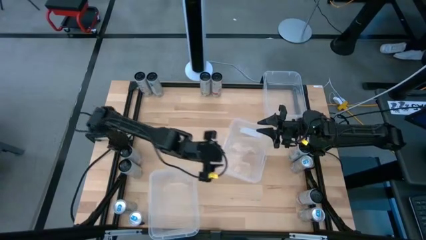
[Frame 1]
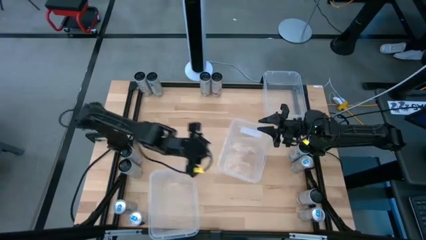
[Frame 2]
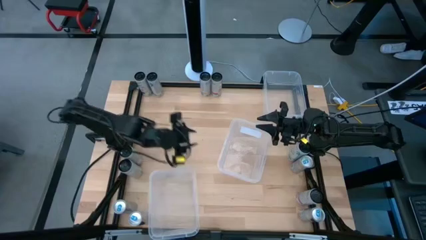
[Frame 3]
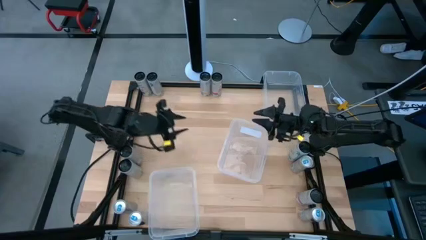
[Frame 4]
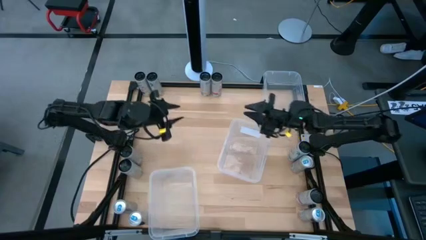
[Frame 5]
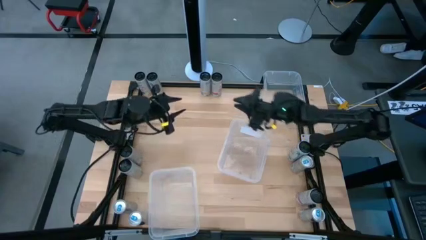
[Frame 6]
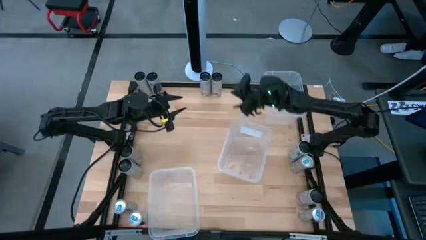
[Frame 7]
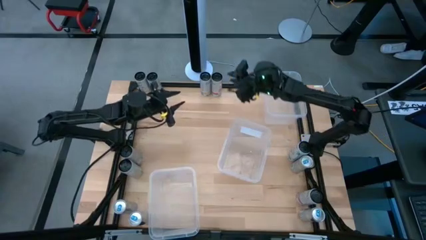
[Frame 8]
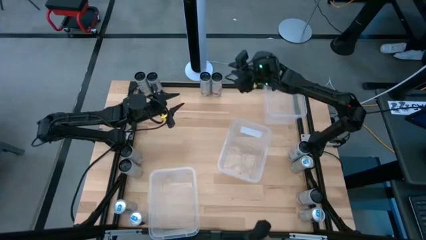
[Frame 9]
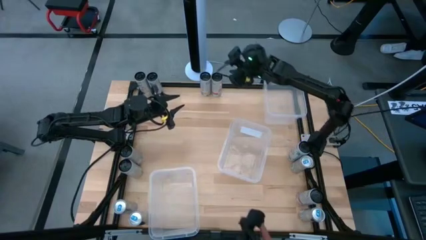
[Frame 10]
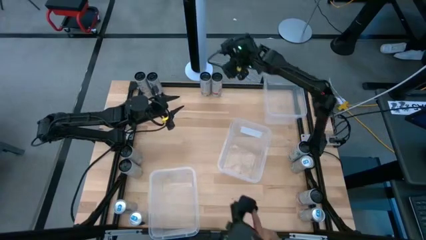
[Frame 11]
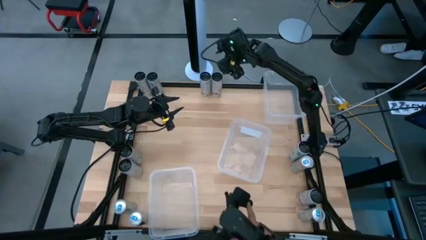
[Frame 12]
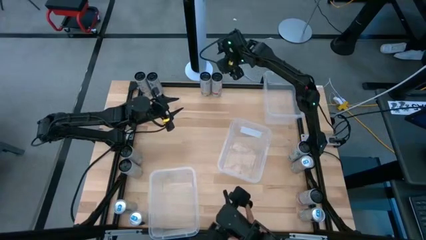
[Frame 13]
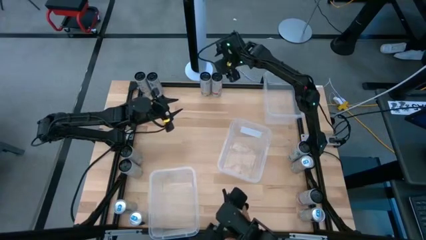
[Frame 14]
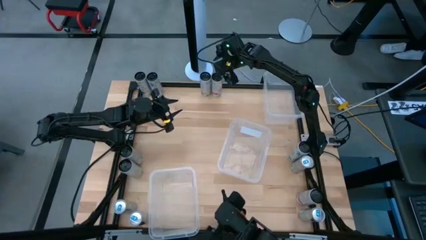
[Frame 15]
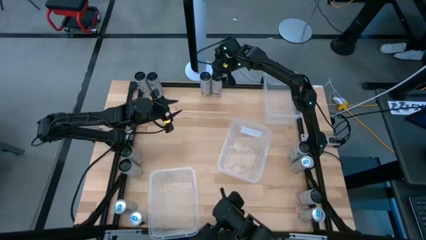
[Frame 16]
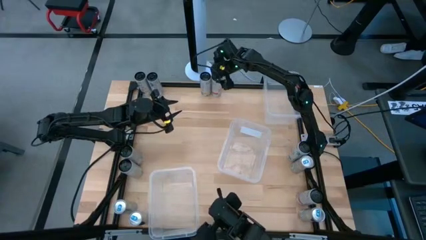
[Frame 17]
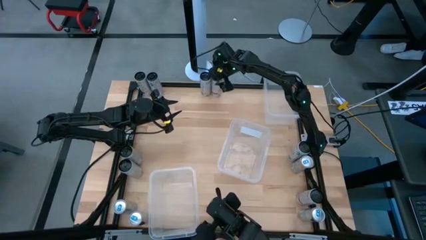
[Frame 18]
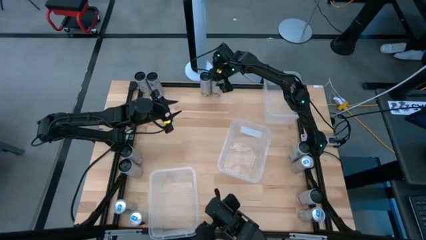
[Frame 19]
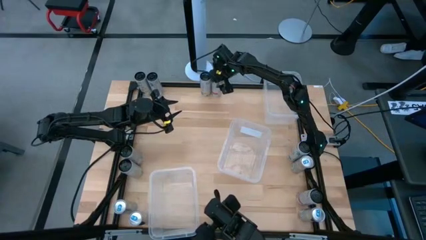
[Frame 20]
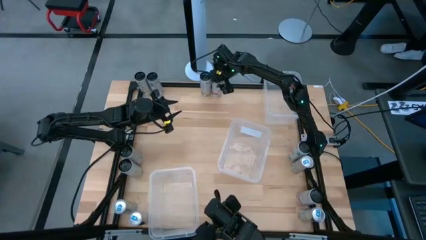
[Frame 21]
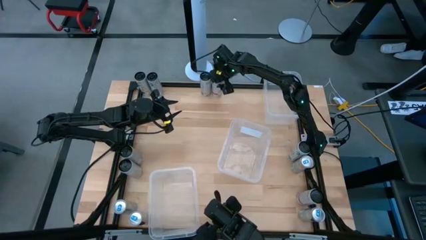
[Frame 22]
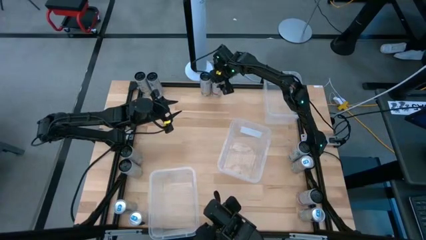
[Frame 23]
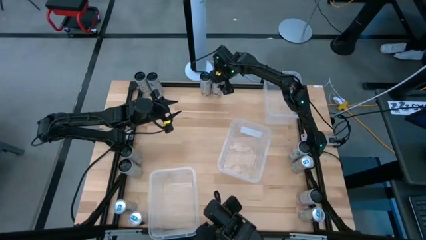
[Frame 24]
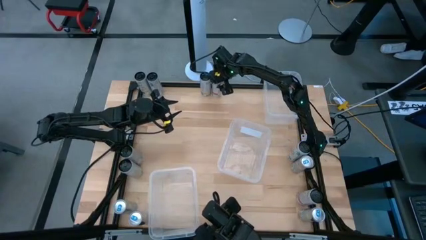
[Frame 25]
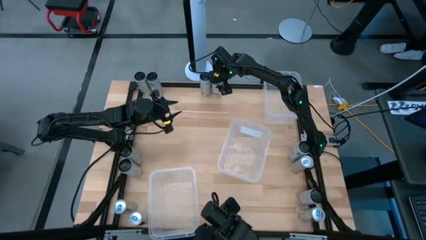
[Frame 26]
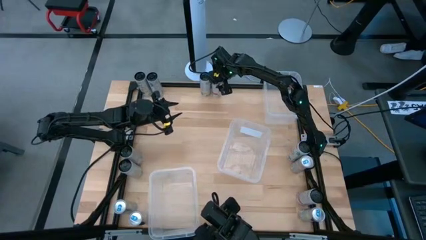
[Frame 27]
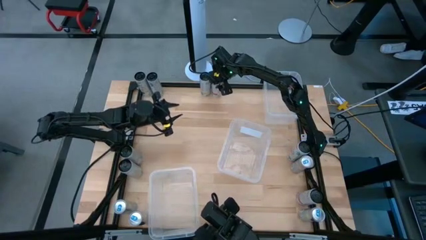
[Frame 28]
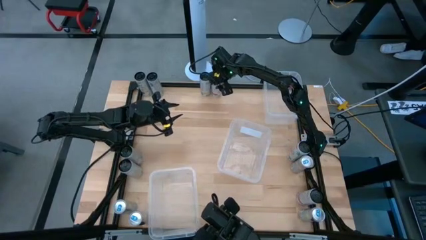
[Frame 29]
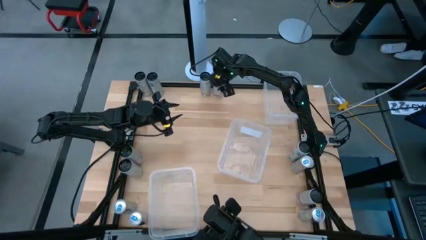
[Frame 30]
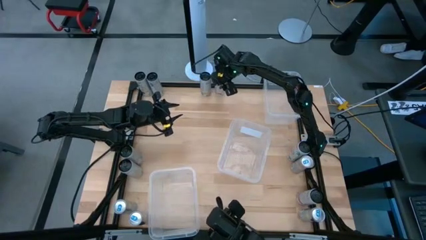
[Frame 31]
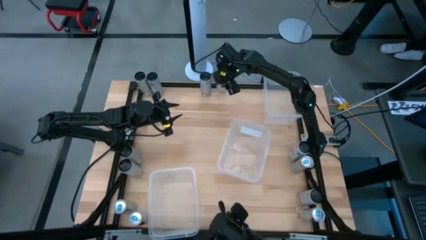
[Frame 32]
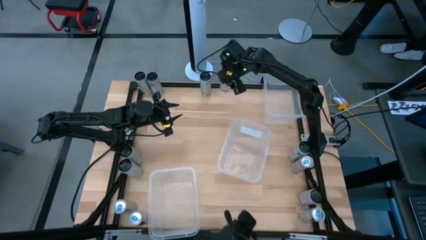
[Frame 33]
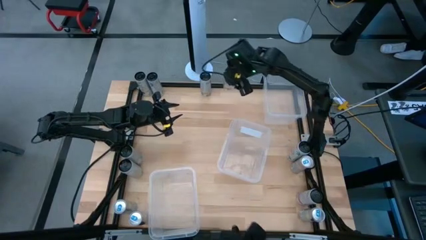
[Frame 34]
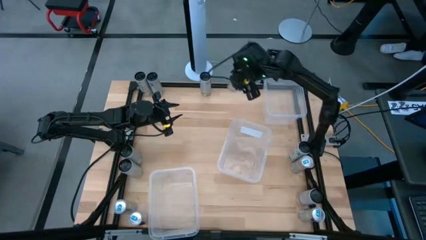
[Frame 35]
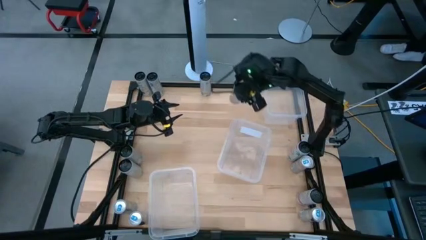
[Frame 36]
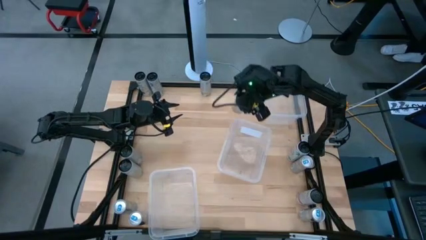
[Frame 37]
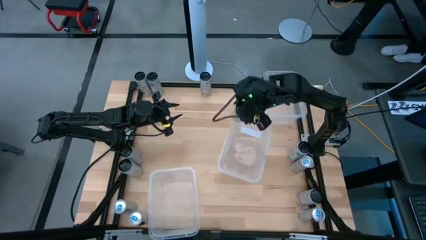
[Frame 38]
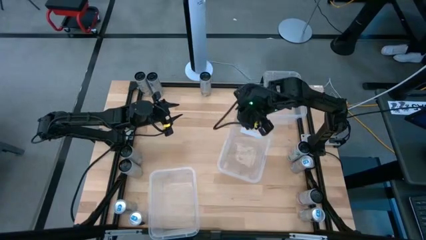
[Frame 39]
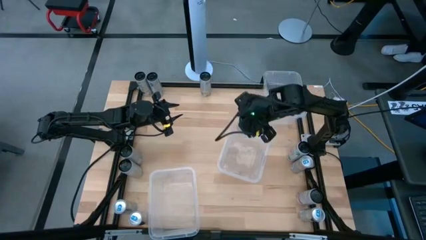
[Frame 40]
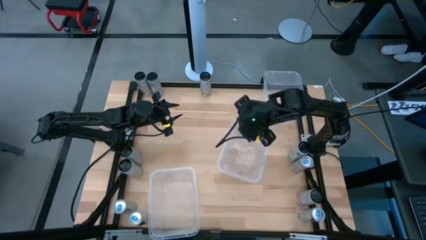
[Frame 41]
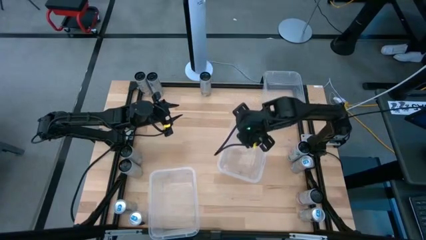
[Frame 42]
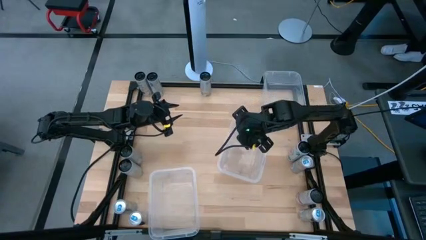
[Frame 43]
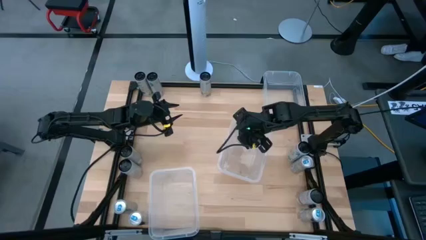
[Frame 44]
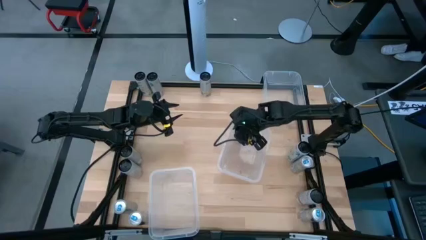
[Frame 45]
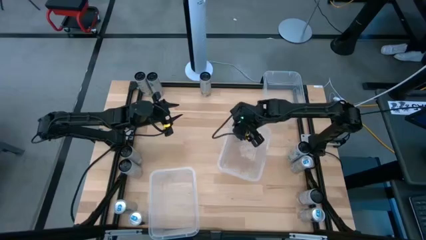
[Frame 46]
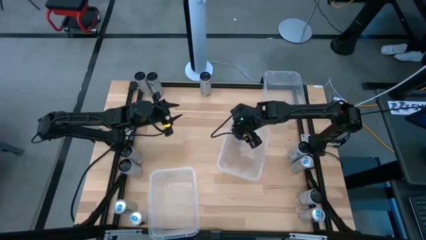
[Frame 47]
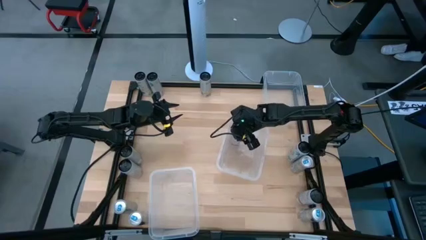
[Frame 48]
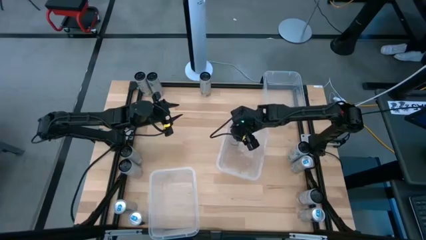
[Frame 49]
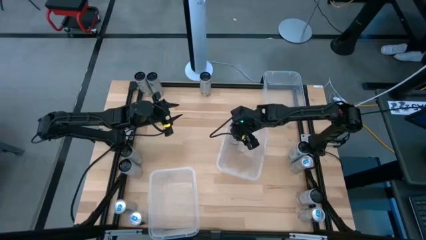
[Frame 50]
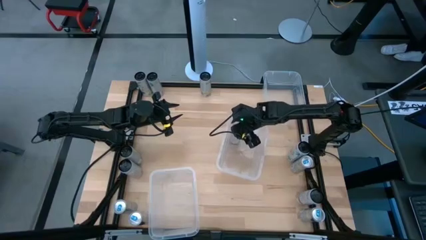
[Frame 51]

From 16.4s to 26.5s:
Task: Sort soda cans
Put the top right white and black peach soda can into the middle transparent bin

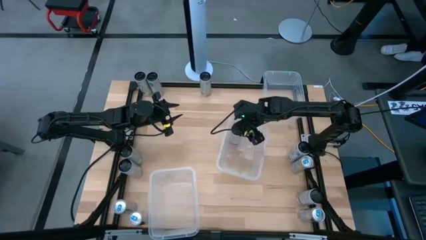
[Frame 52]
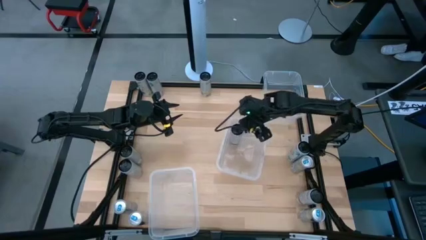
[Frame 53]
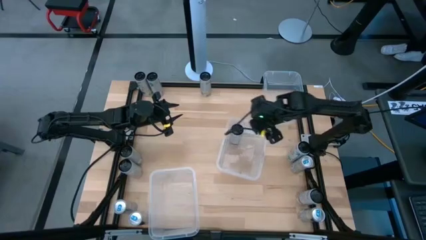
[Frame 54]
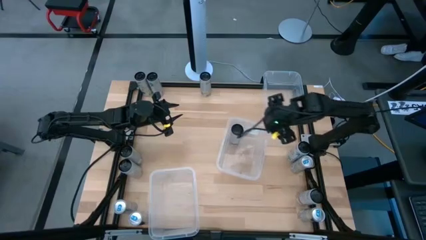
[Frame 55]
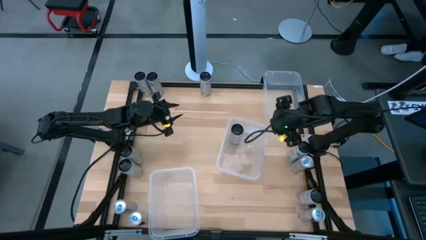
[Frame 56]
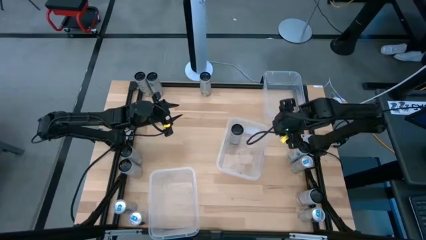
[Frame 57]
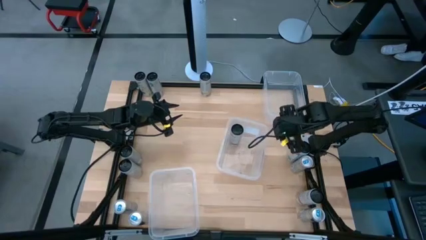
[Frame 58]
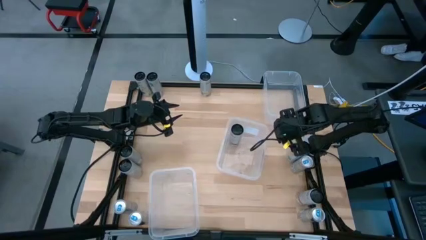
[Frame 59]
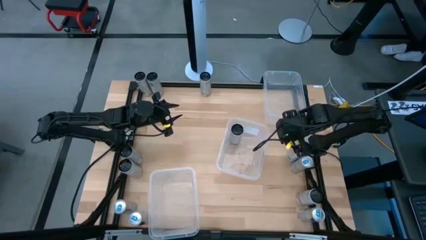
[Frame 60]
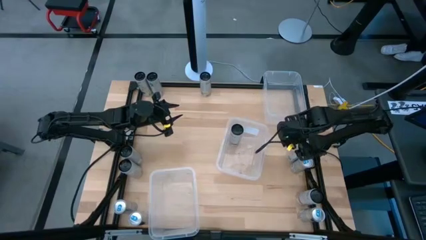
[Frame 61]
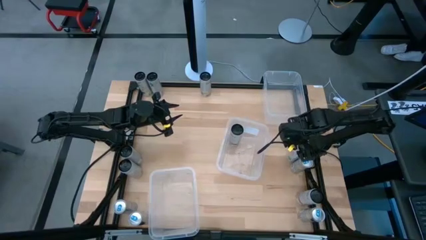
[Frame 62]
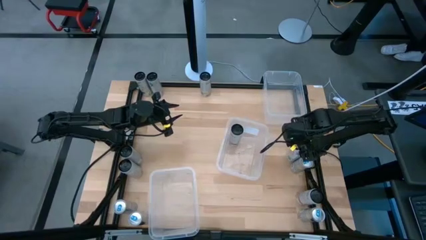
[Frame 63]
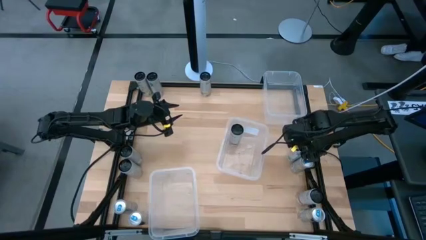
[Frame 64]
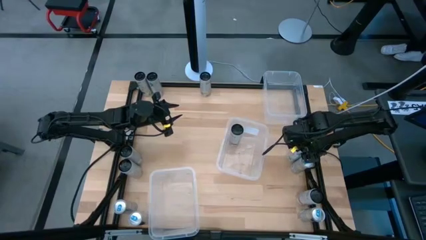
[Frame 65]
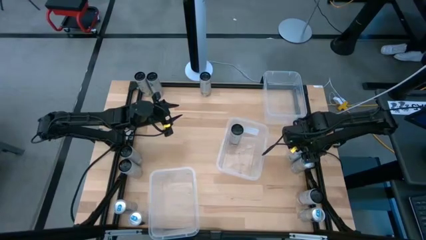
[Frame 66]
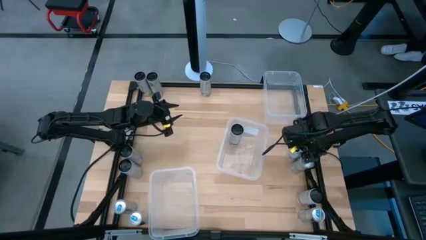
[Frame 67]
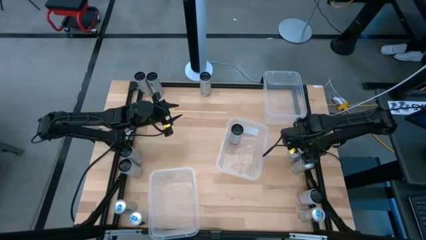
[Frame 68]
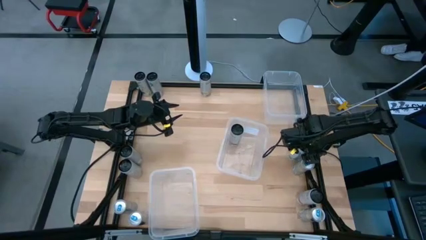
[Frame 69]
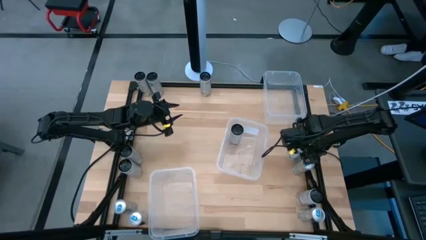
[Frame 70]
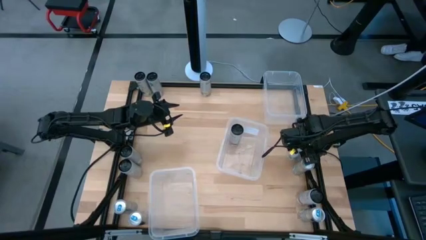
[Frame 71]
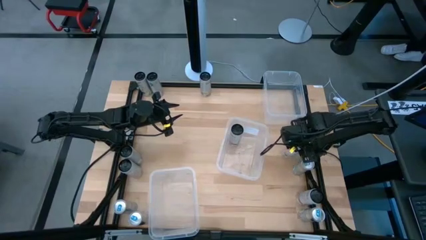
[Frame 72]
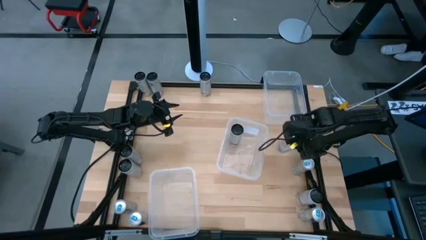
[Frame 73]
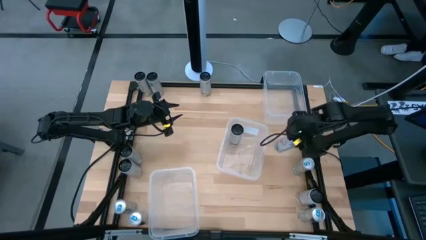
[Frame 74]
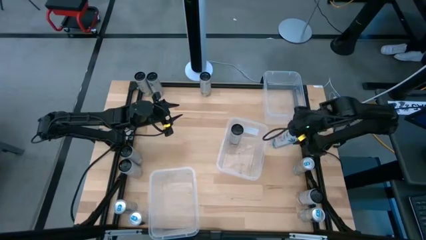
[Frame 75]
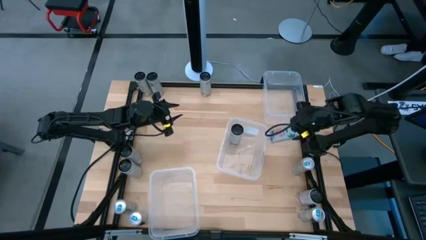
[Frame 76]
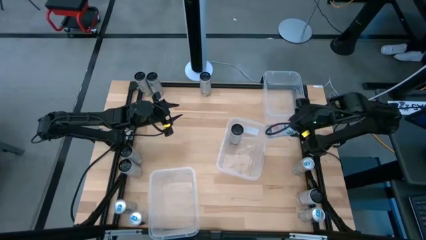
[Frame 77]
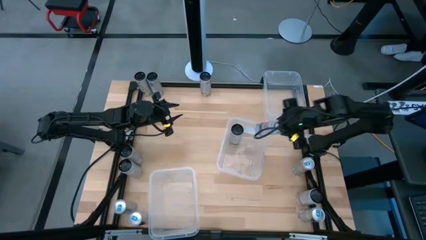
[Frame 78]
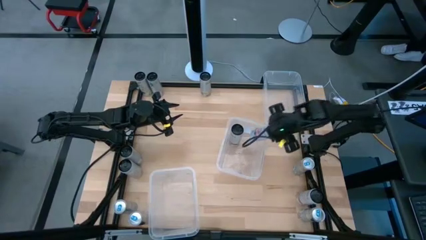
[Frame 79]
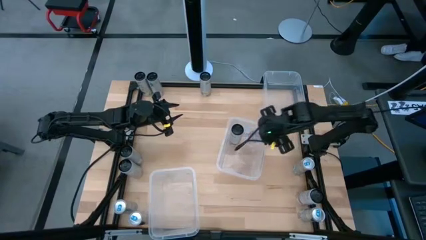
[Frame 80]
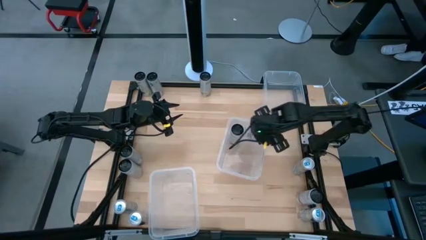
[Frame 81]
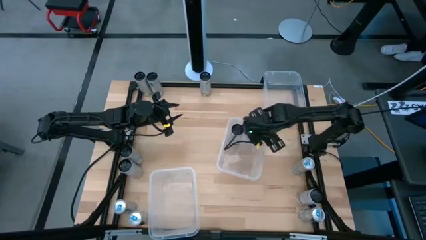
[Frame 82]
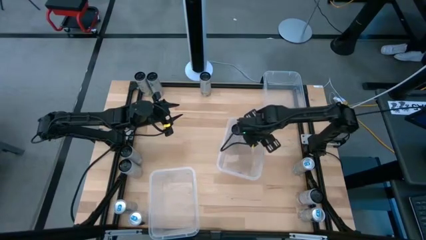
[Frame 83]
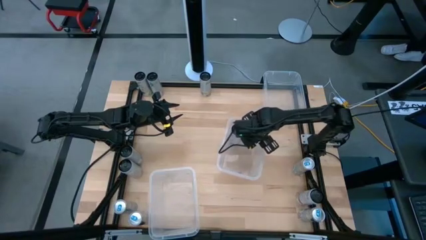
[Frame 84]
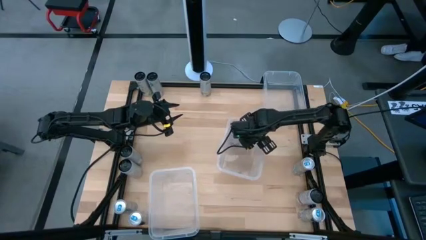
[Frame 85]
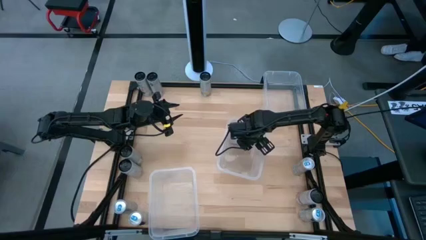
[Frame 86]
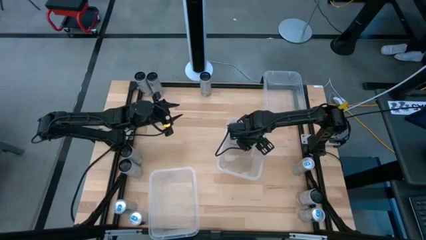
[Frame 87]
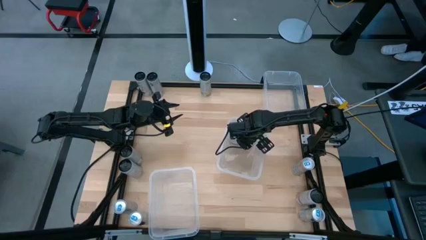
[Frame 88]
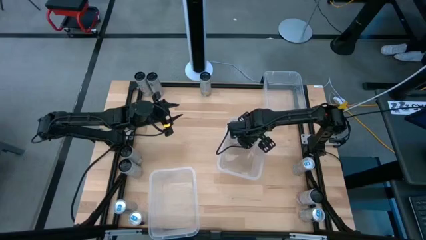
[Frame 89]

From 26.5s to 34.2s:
Put the middle right white and black peach soda can into the middle transparent bin
